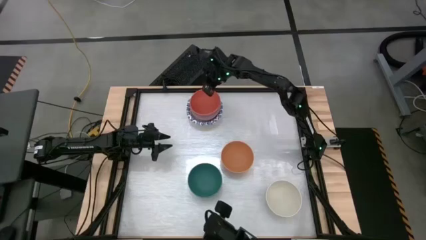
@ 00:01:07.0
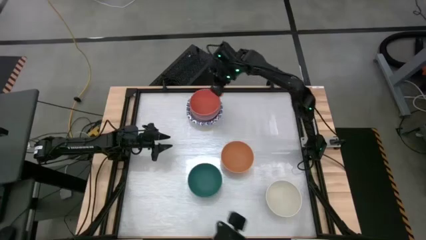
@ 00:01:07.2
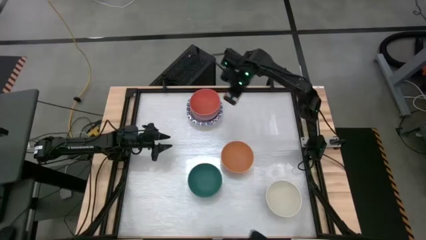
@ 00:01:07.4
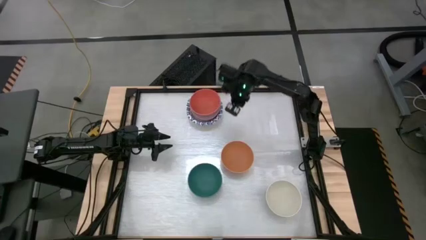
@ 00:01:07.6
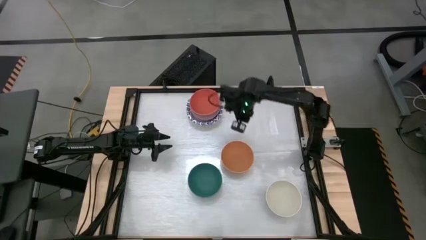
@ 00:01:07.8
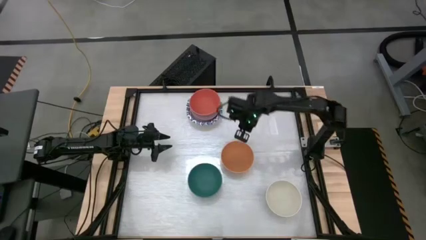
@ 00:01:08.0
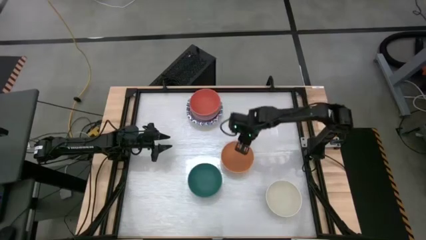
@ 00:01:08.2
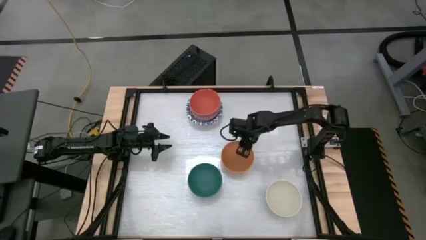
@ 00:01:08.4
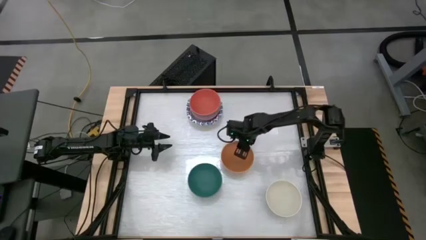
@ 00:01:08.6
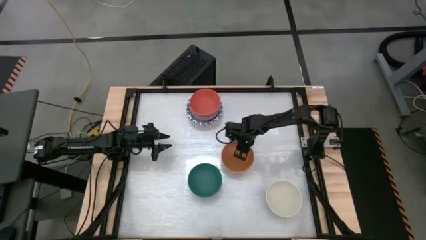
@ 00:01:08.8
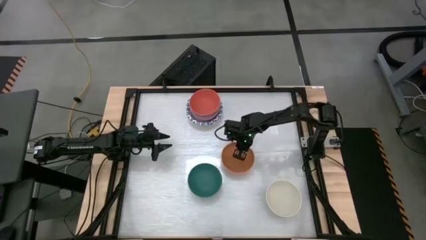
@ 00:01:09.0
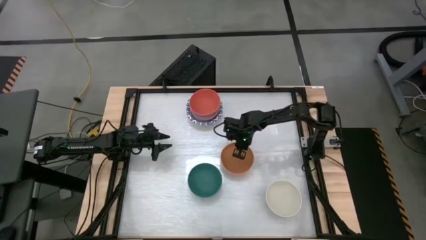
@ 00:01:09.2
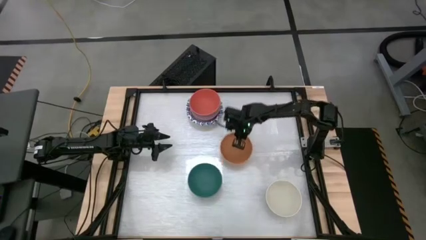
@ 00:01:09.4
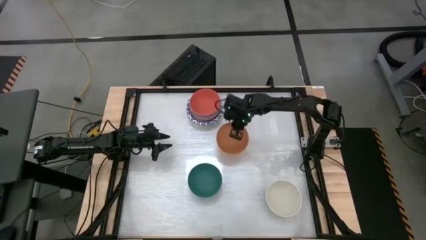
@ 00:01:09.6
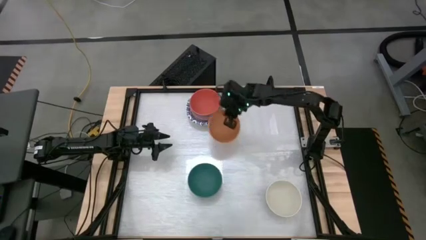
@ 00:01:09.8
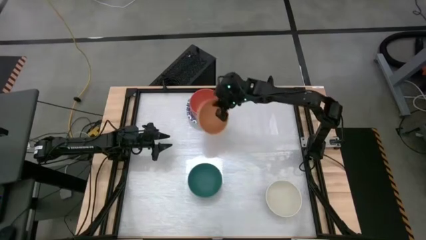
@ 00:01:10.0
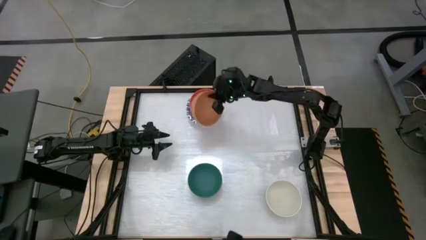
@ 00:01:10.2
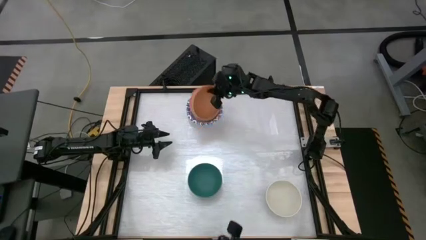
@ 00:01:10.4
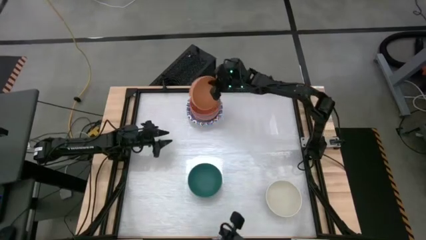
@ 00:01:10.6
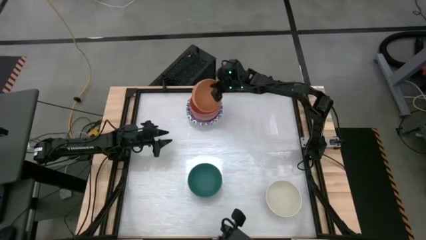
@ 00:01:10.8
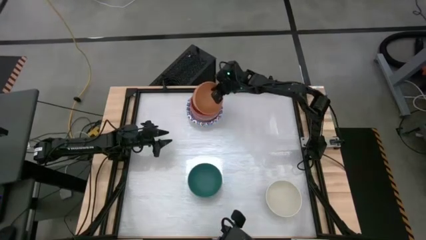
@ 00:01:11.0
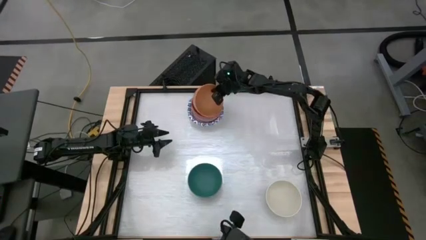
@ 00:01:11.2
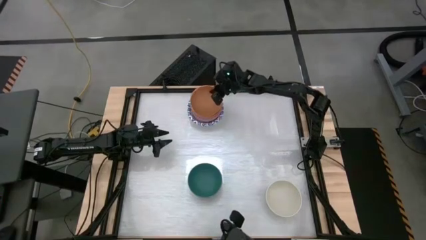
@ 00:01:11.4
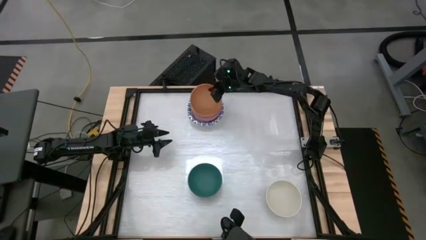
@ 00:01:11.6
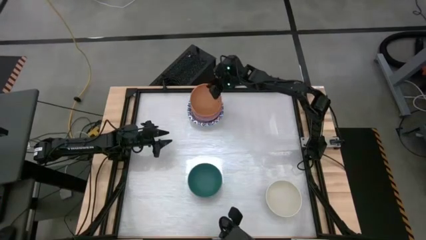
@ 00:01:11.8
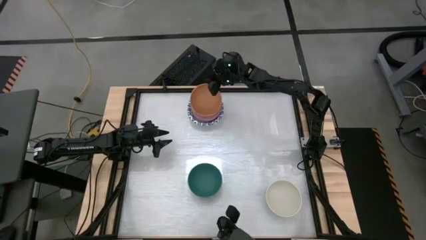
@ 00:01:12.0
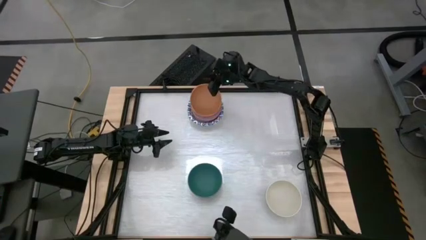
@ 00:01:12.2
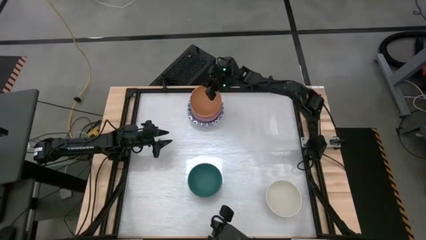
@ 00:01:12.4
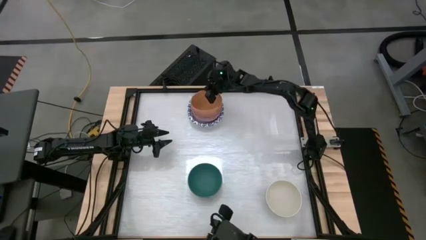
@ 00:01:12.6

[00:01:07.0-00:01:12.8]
Stack the brown bowl on top of the orange bowl

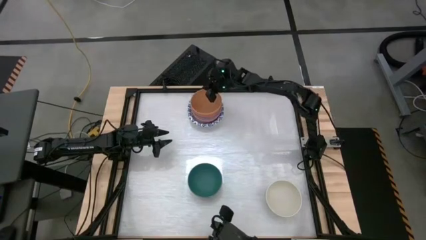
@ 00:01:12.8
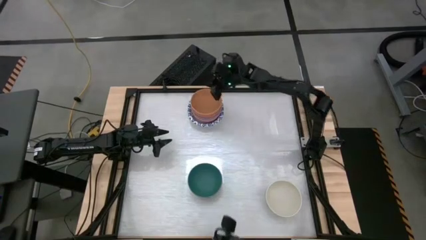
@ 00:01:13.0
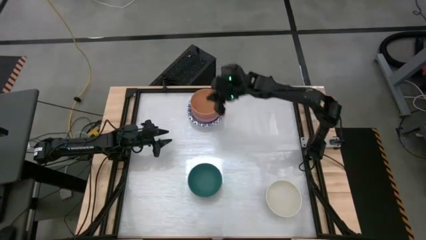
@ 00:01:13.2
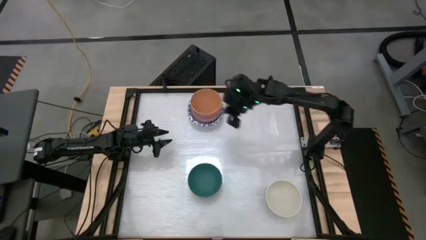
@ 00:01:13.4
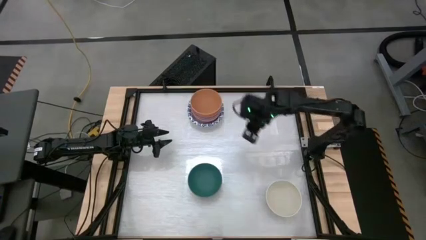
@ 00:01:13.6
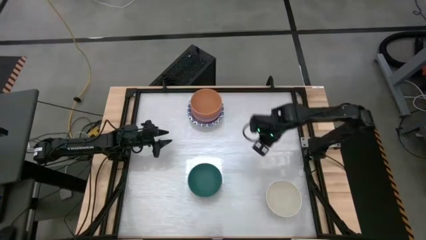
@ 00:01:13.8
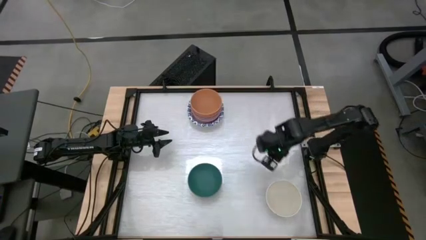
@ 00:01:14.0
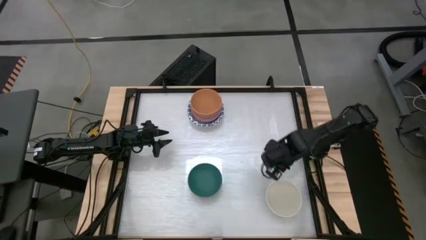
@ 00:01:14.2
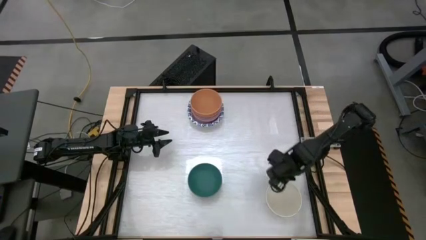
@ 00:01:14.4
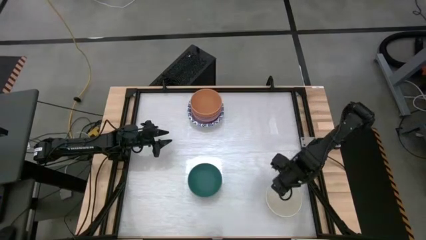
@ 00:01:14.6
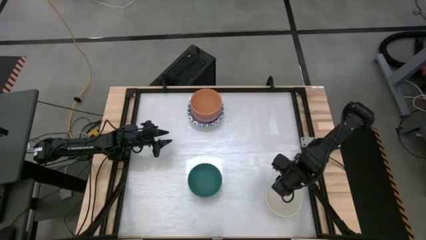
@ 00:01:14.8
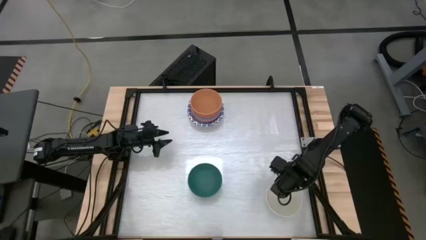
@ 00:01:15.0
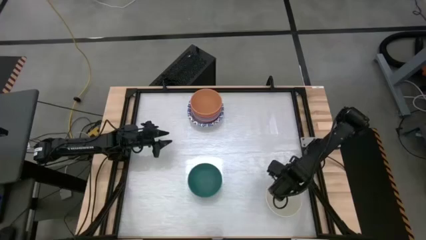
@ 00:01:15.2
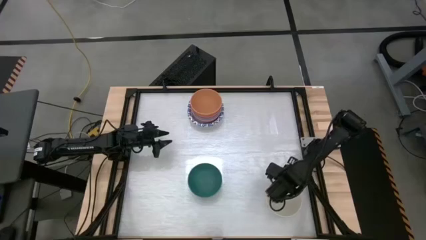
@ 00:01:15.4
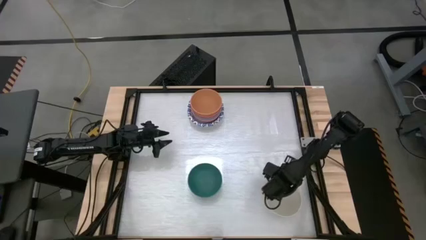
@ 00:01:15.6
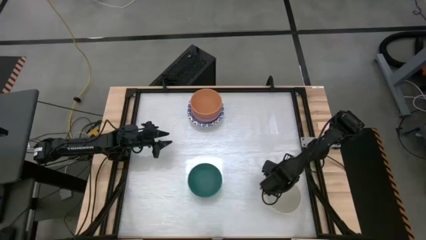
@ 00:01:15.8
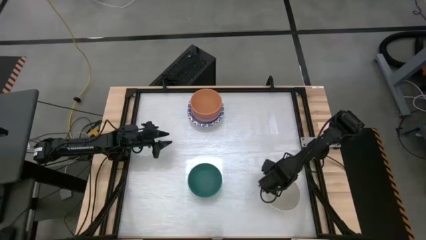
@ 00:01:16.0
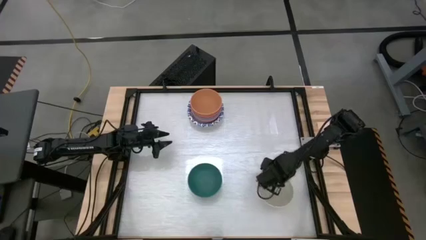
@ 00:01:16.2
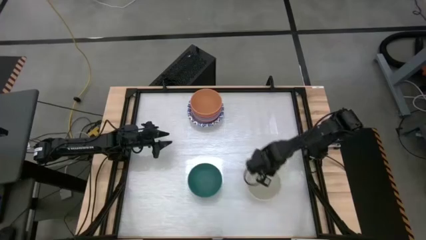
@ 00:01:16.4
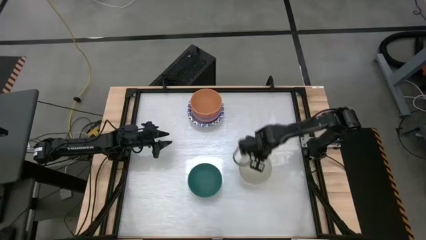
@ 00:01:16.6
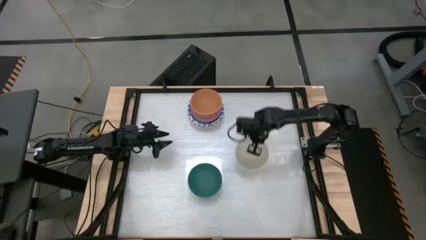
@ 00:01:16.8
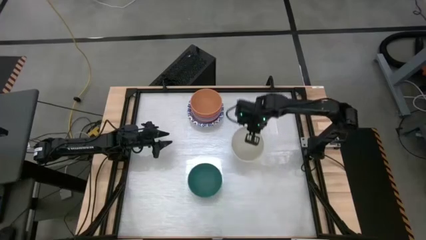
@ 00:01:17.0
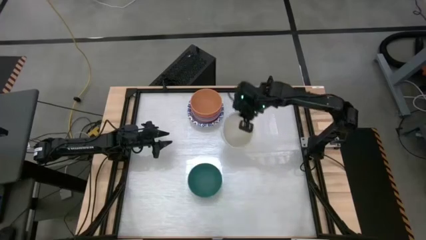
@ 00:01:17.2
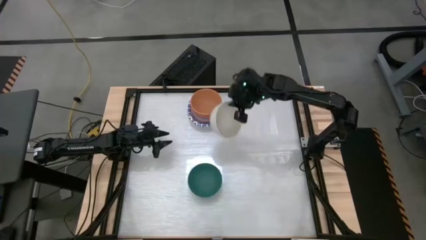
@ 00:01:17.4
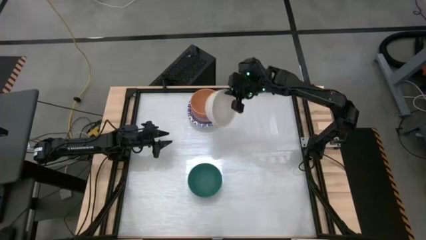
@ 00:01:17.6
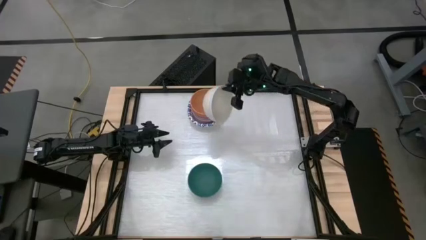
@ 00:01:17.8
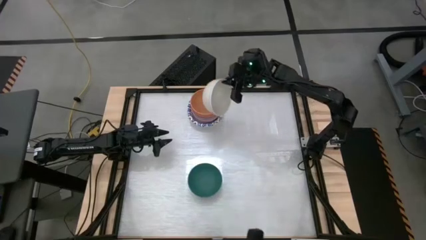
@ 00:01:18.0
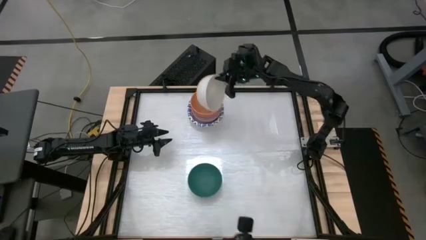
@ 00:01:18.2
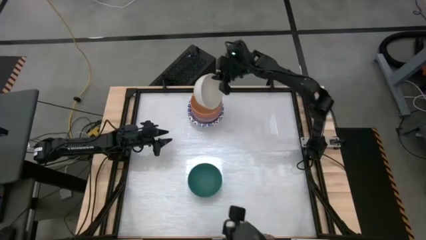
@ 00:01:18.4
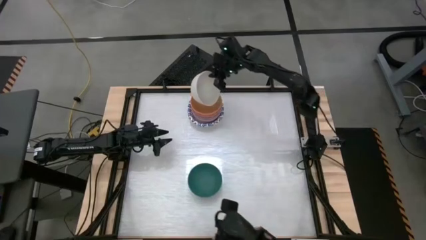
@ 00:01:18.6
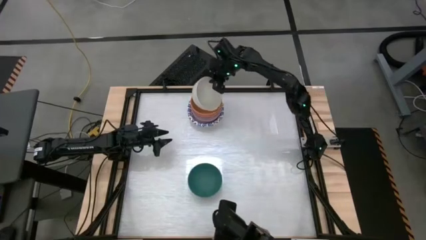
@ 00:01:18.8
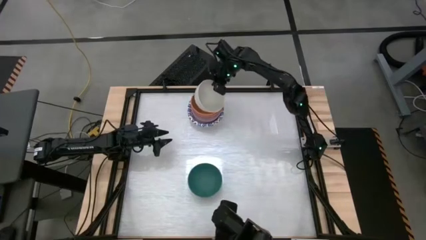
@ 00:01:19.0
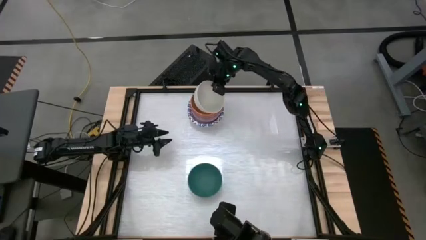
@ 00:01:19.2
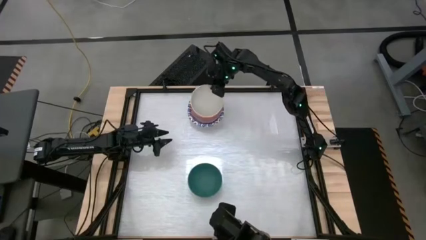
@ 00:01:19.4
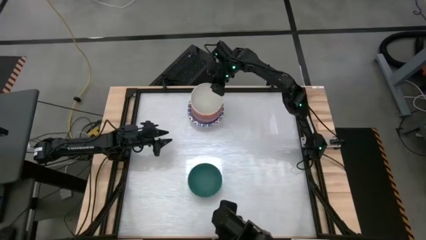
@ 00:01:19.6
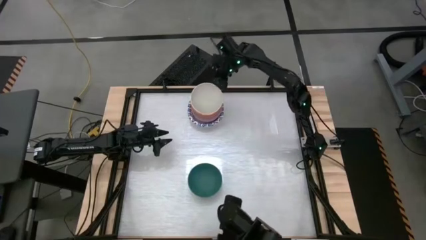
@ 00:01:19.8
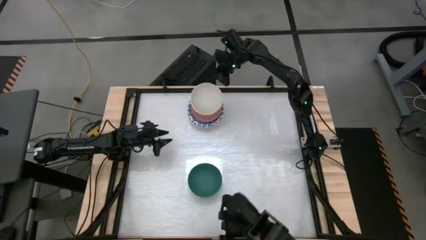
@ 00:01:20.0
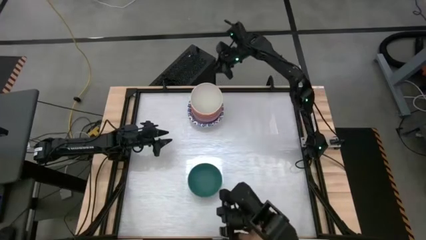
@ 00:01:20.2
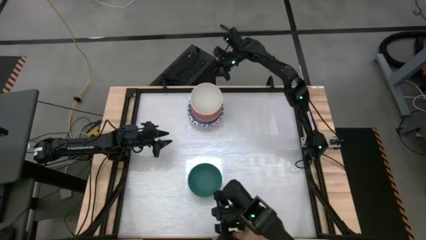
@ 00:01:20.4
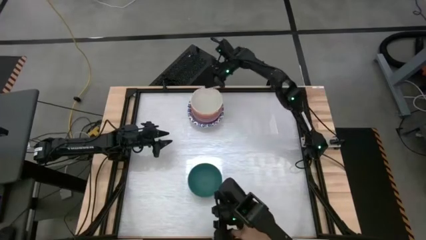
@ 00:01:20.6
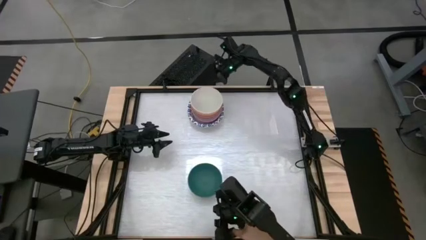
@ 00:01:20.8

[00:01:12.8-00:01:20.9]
Stack the white bowl on top of the brown bowl
